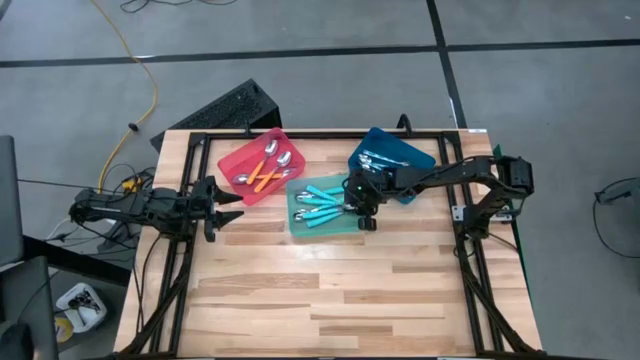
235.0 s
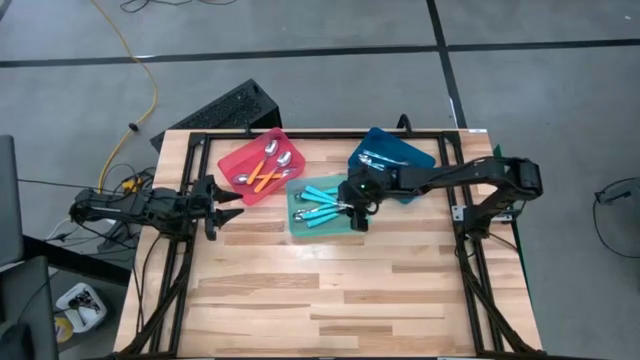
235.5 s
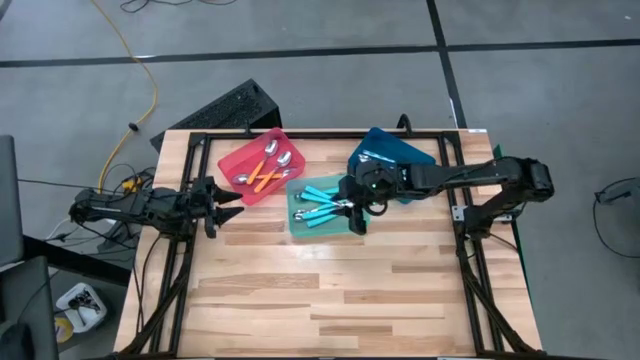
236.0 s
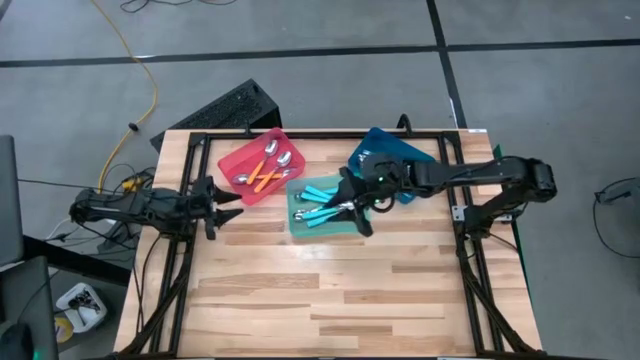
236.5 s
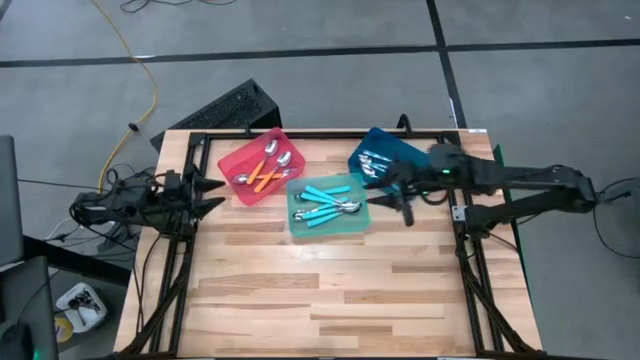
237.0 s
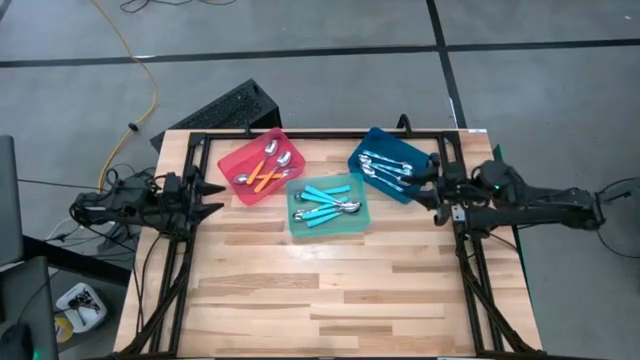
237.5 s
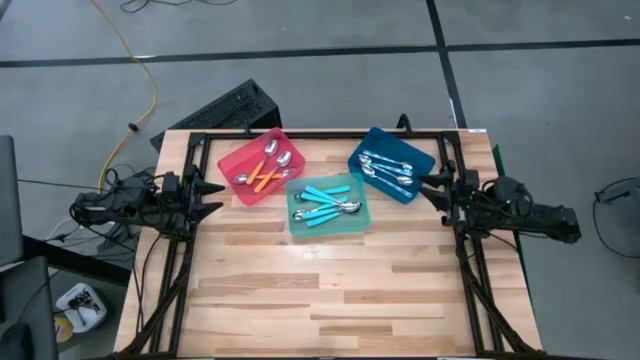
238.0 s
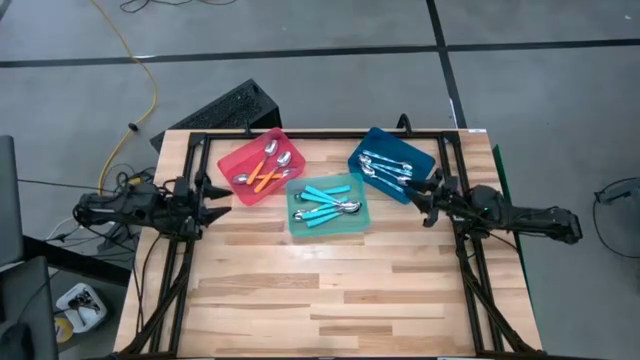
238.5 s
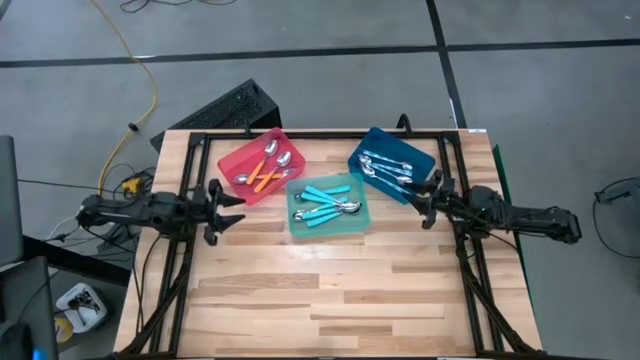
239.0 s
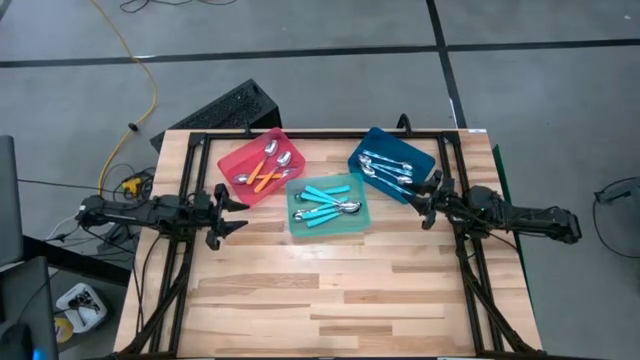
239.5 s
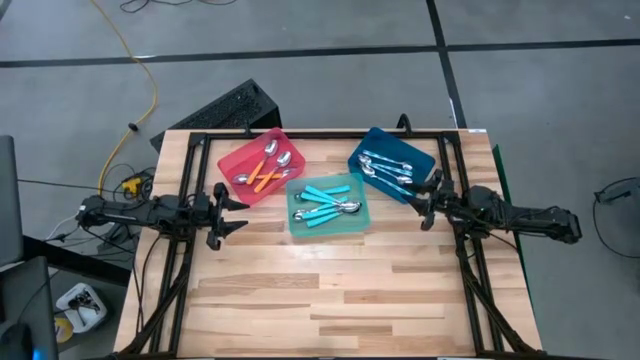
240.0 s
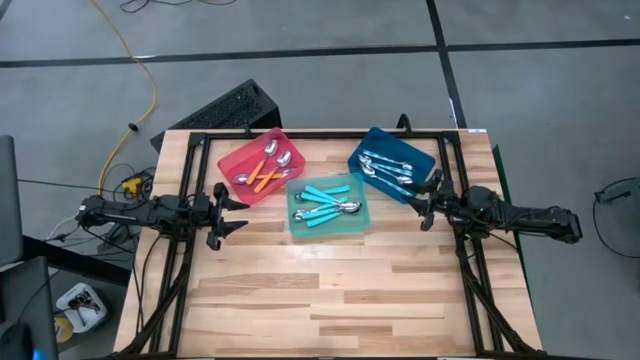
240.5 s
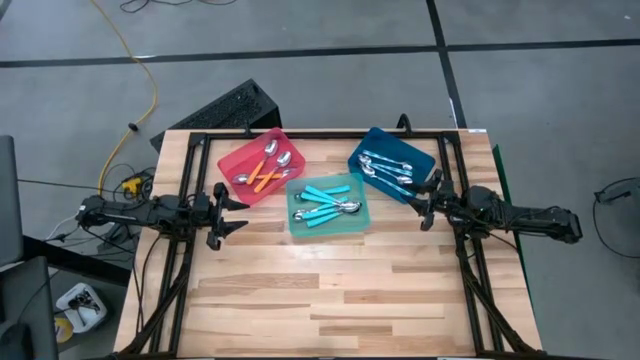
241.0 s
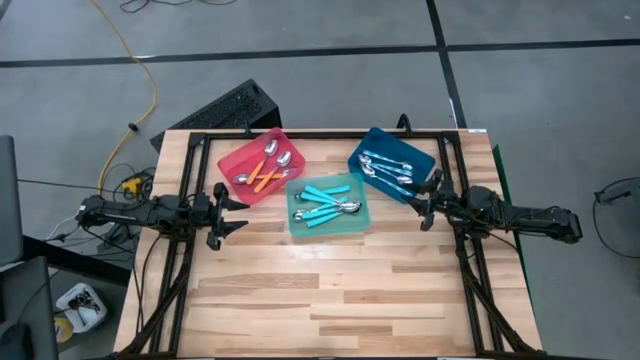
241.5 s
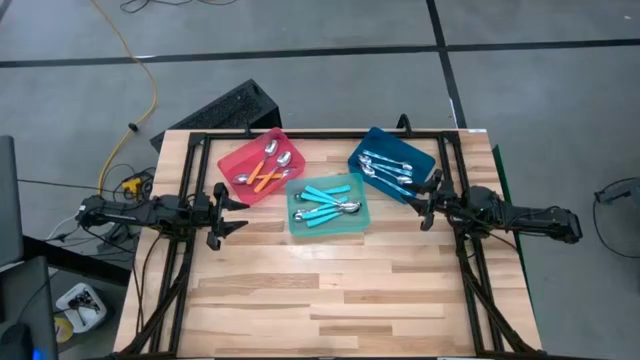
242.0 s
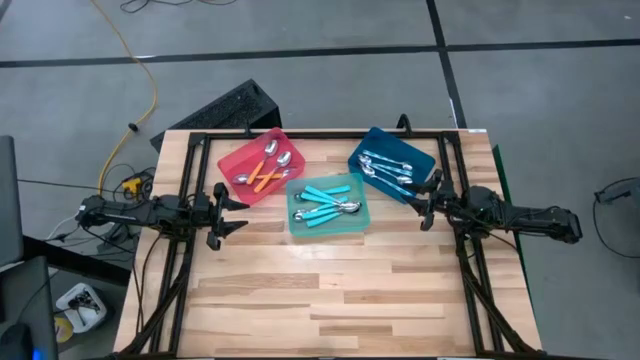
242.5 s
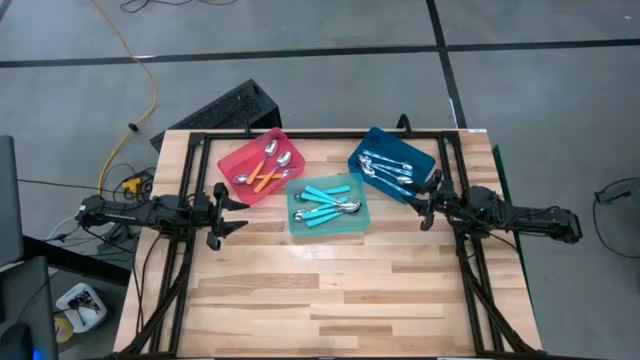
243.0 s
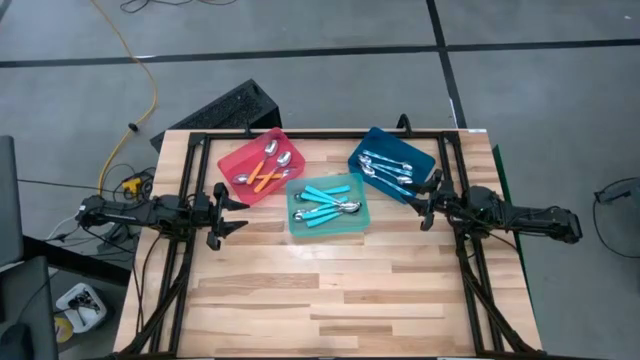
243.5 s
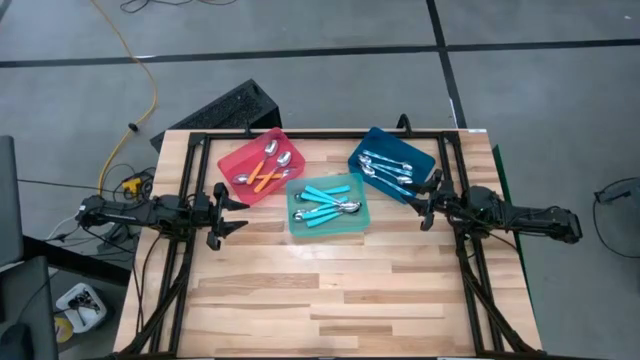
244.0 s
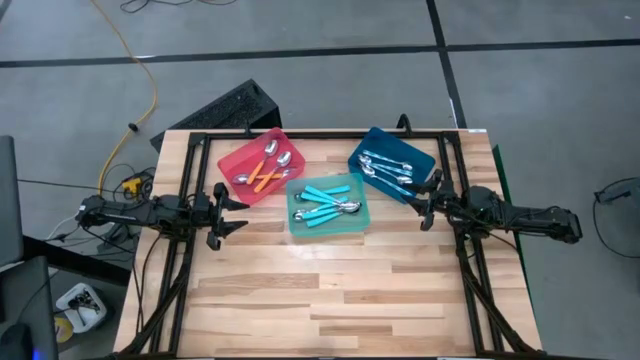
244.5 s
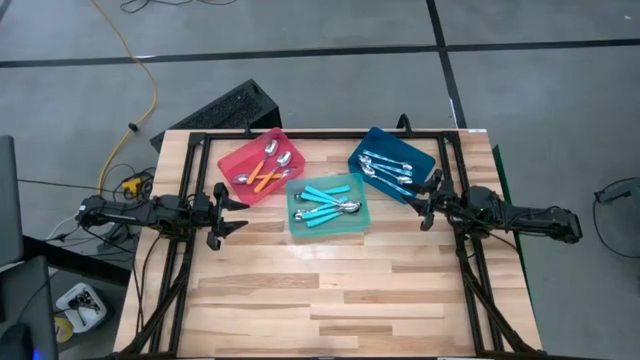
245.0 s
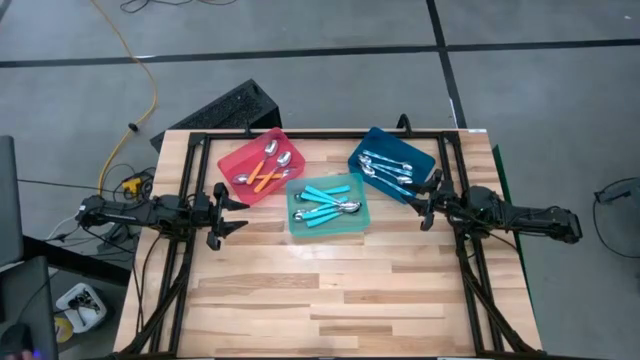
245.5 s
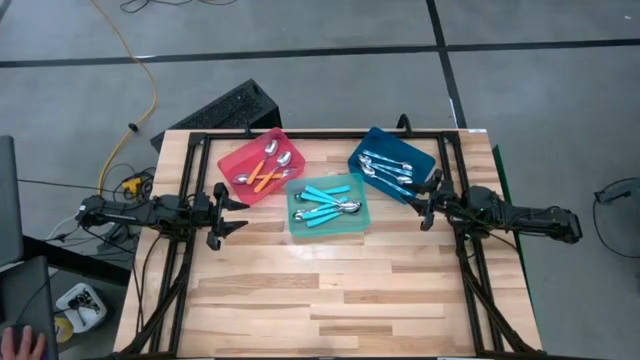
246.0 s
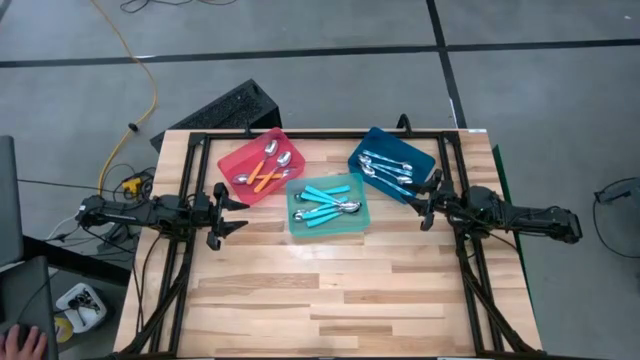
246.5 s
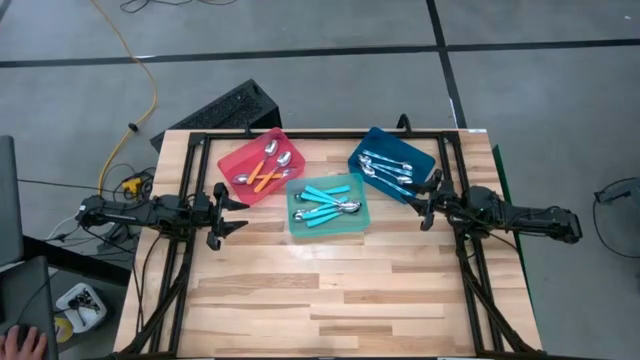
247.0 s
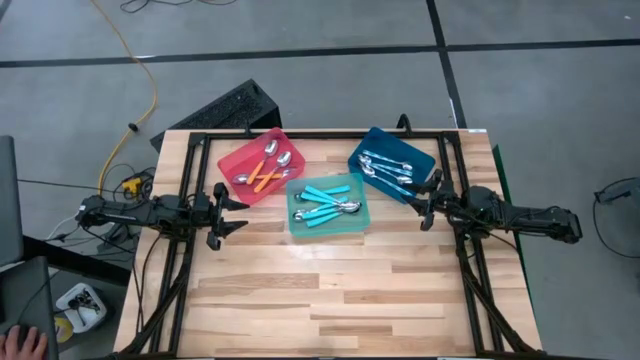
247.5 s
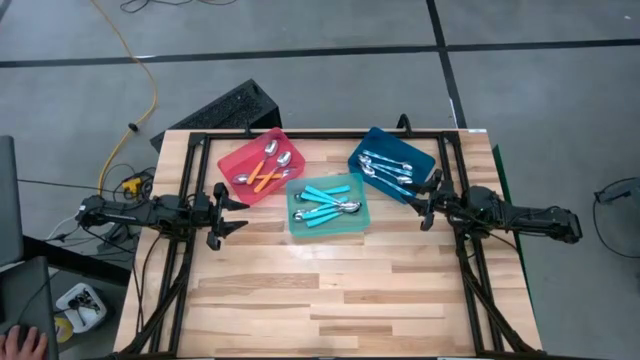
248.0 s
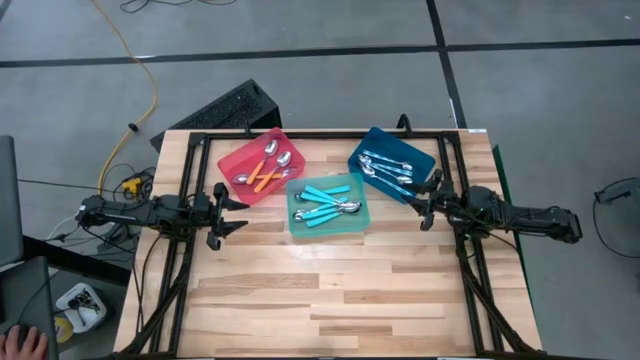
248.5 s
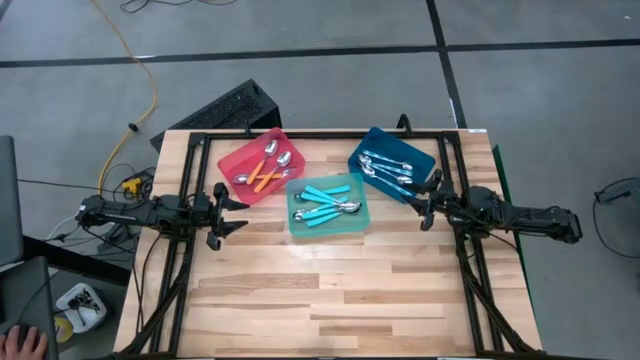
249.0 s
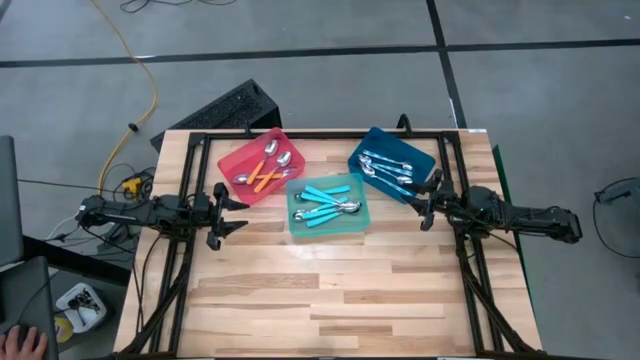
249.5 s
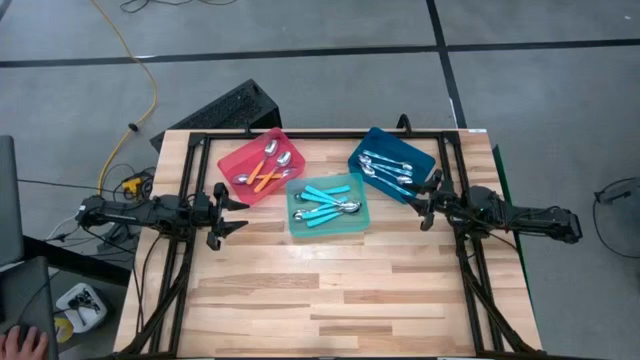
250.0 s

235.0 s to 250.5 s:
Task: Sort silverware by color (type)
Return to Home Position

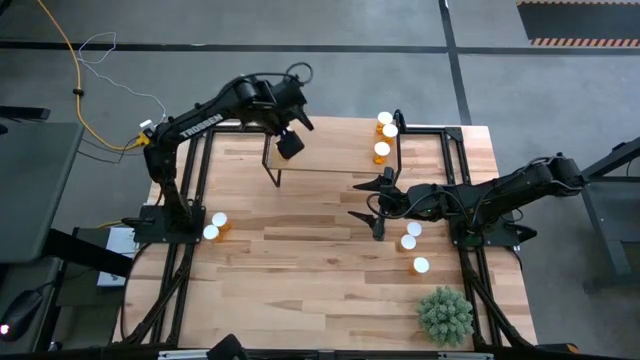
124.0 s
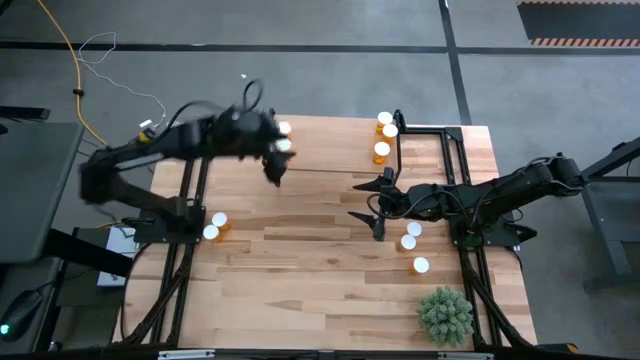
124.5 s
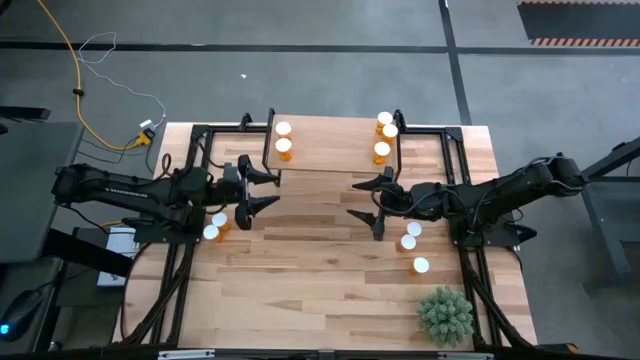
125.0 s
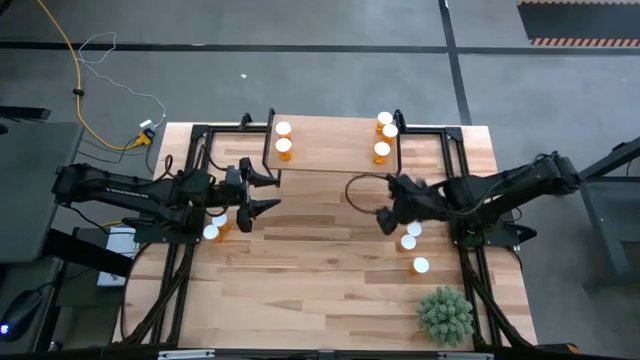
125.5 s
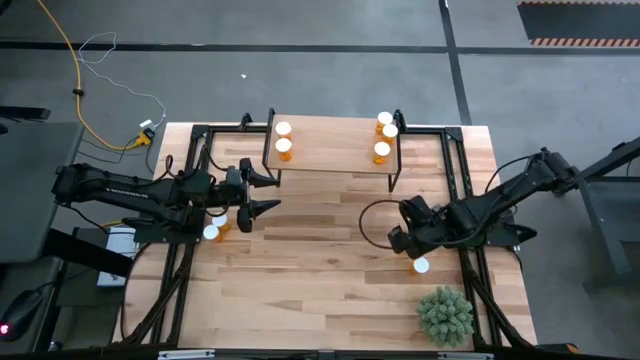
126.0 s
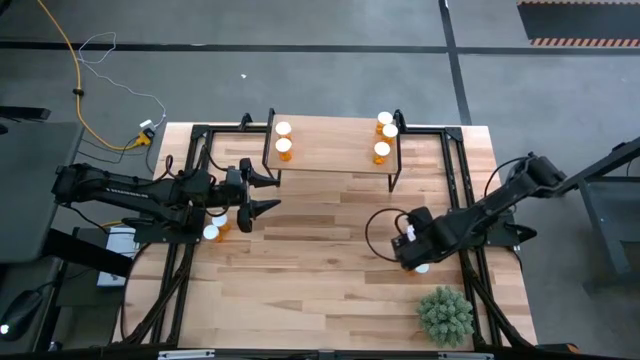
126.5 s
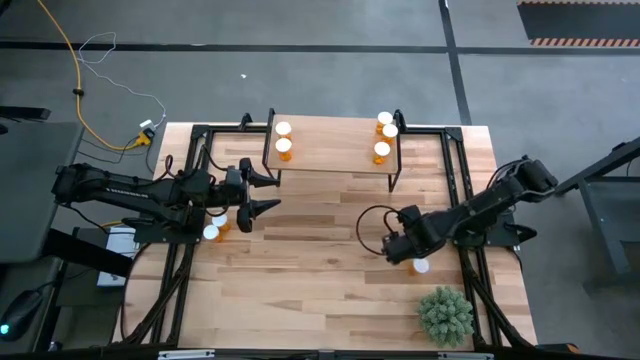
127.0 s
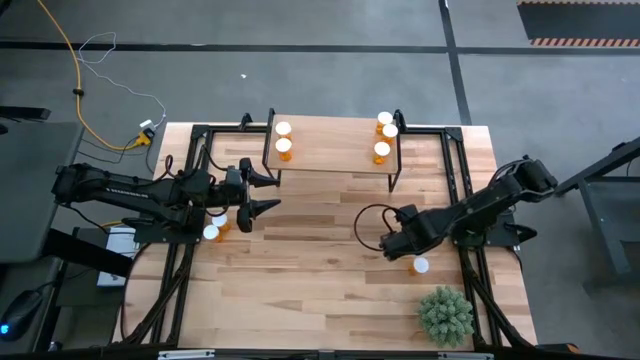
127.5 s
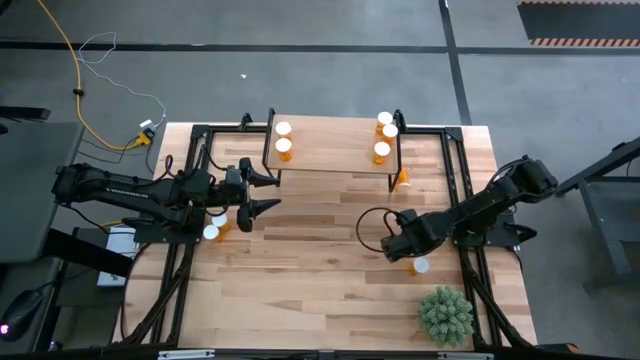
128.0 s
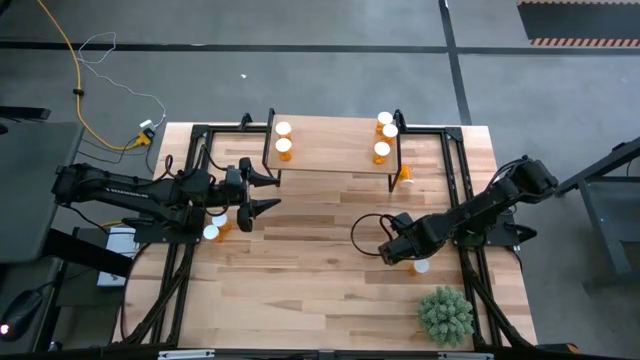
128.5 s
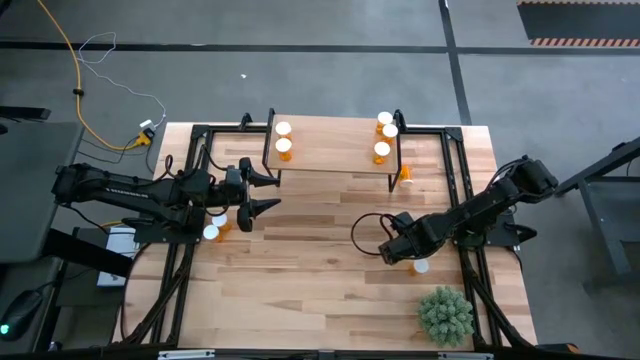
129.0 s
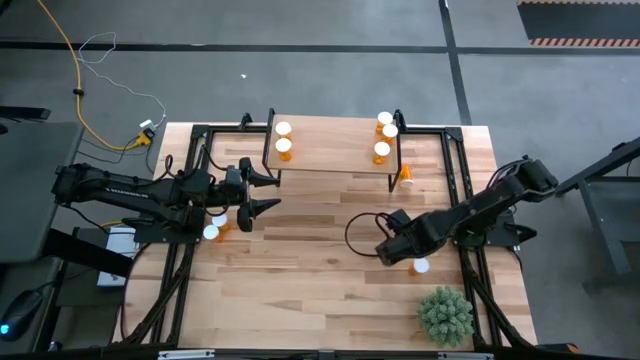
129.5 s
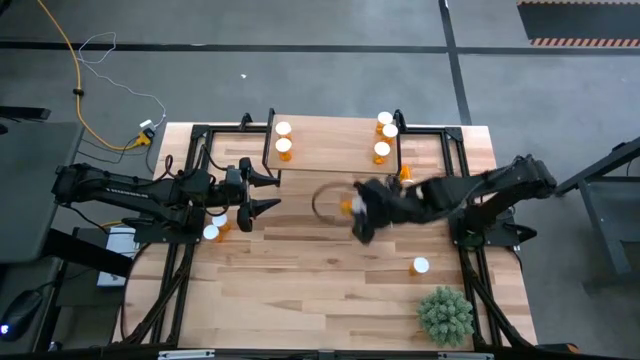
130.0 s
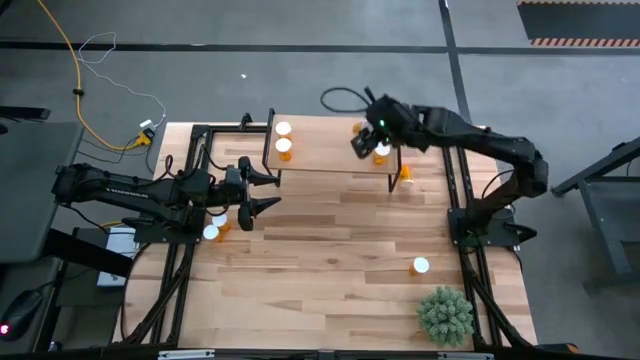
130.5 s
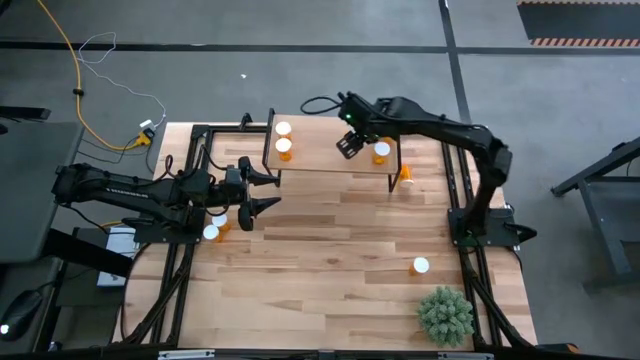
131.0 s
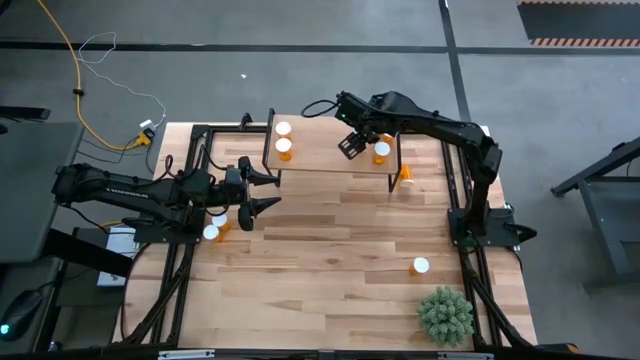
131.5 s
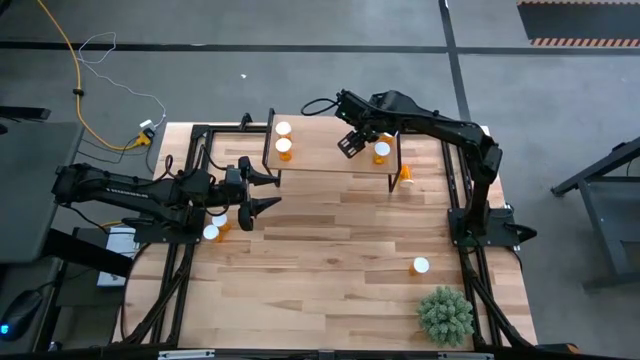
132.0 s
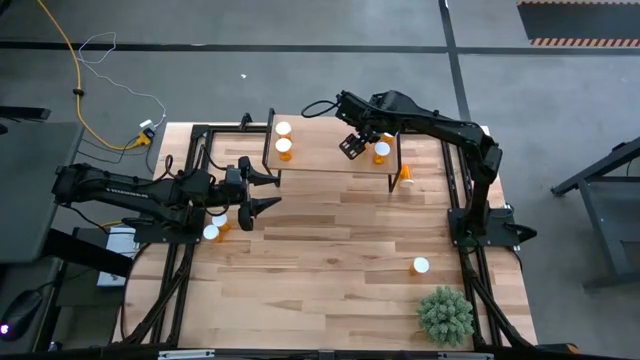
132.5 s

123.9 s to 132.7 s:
Task: Pick and place medicine bottles onto shelf by color
Put the yellow pill bottle on the shelf
